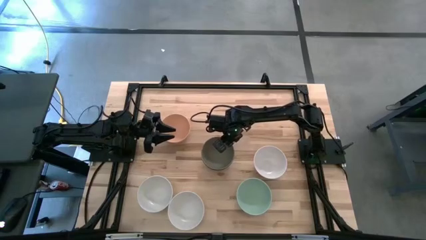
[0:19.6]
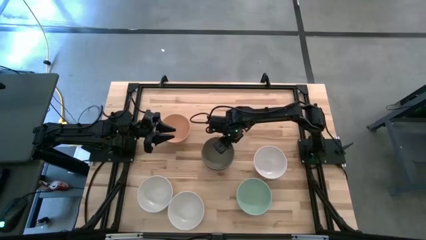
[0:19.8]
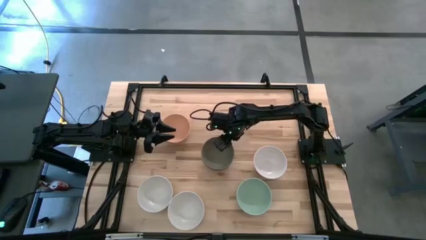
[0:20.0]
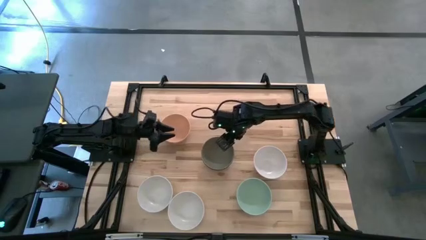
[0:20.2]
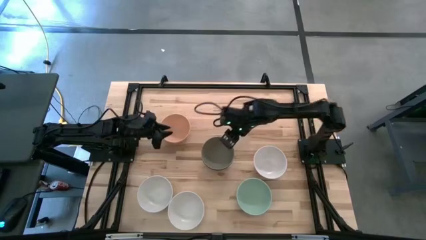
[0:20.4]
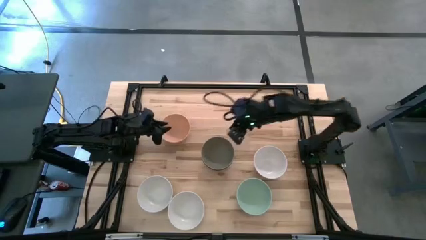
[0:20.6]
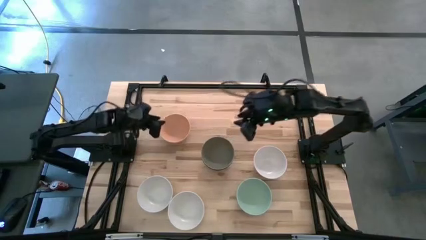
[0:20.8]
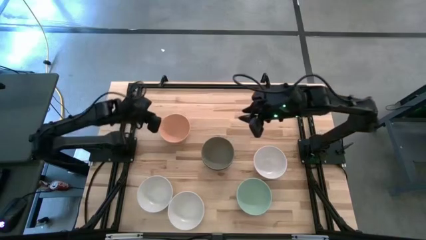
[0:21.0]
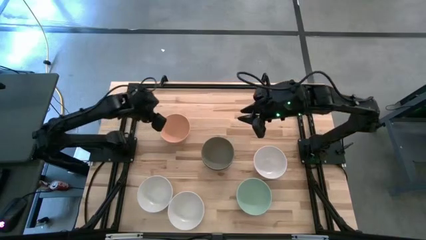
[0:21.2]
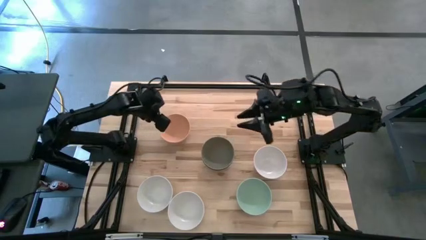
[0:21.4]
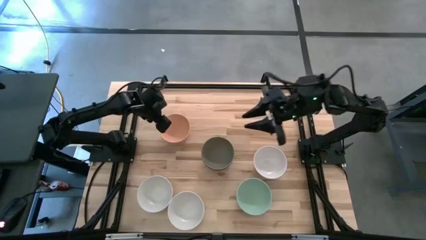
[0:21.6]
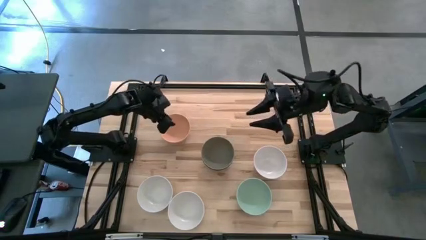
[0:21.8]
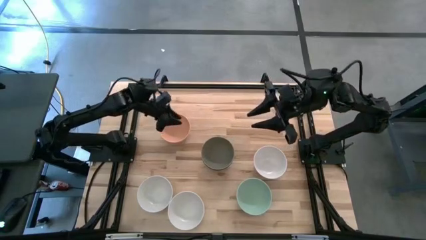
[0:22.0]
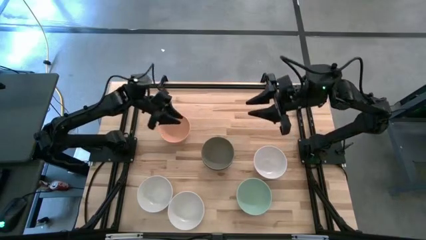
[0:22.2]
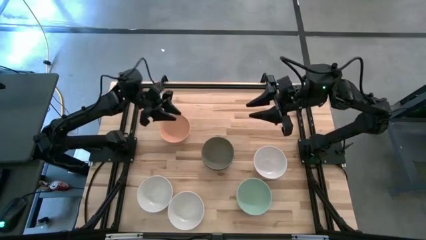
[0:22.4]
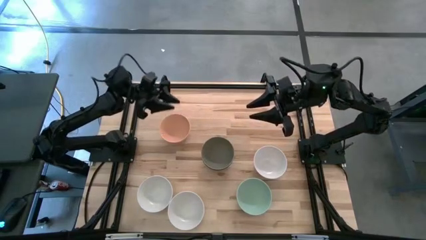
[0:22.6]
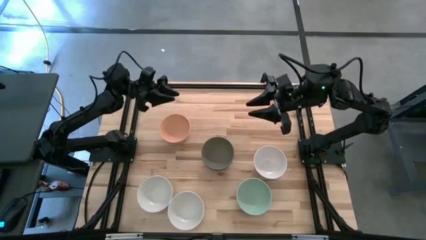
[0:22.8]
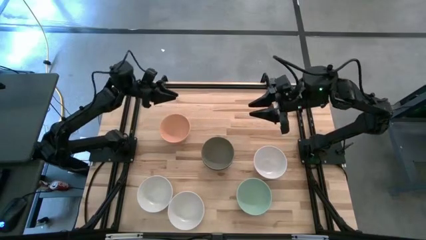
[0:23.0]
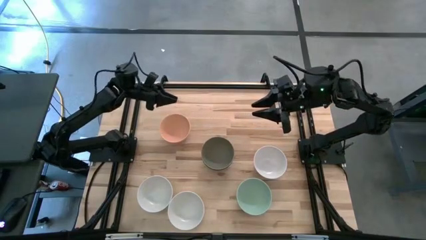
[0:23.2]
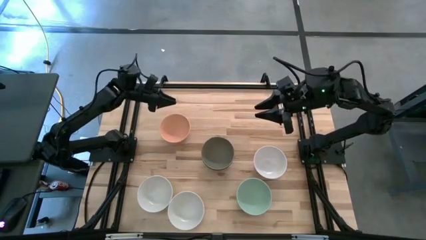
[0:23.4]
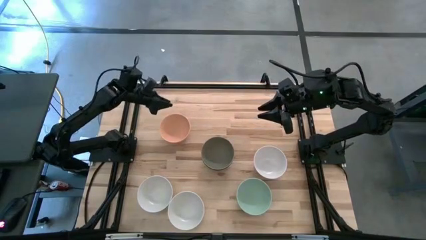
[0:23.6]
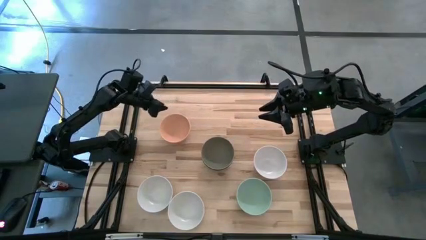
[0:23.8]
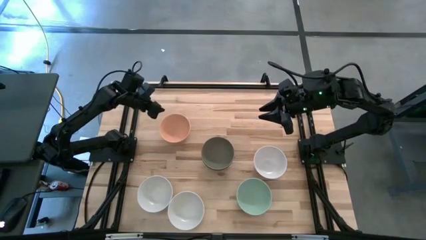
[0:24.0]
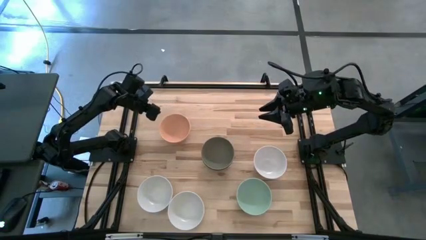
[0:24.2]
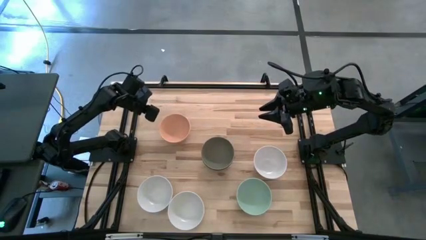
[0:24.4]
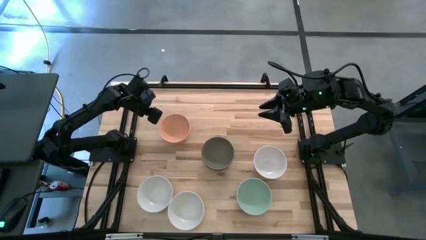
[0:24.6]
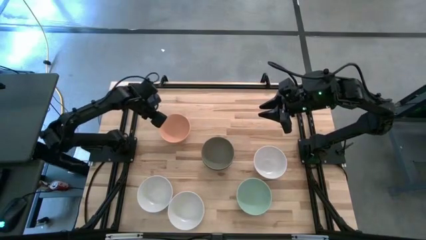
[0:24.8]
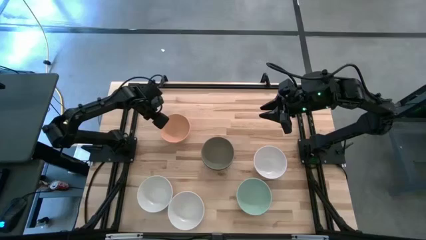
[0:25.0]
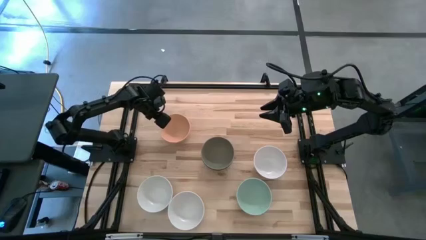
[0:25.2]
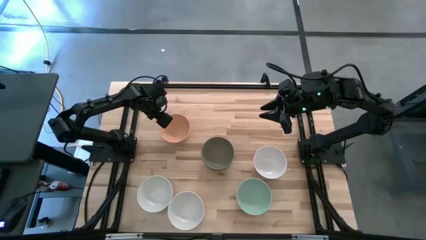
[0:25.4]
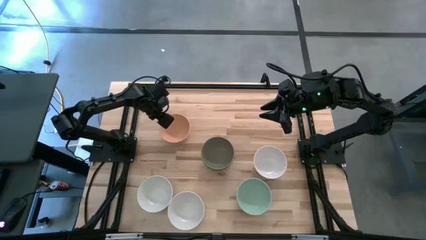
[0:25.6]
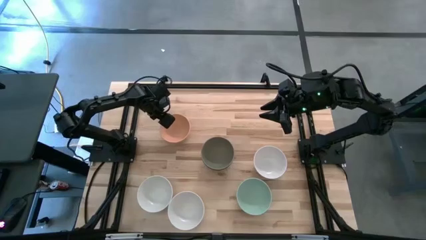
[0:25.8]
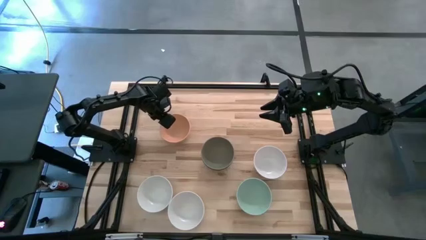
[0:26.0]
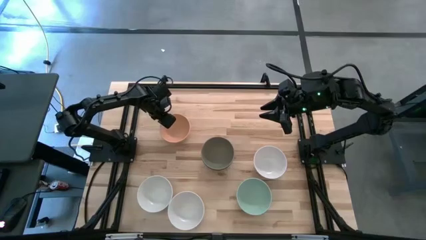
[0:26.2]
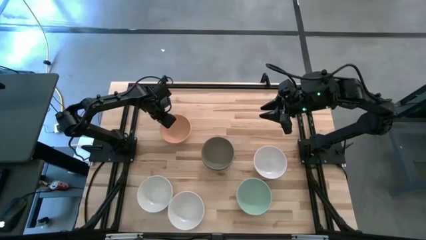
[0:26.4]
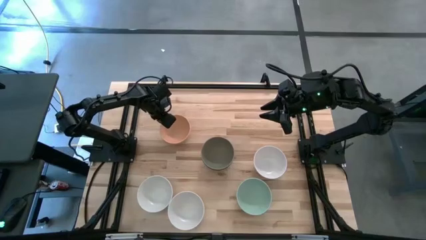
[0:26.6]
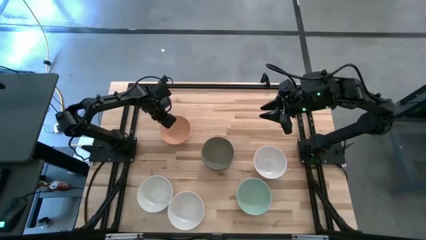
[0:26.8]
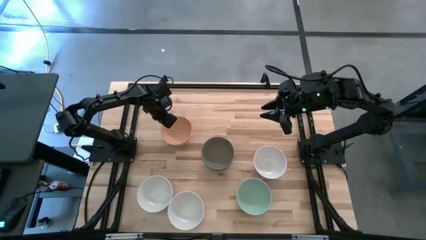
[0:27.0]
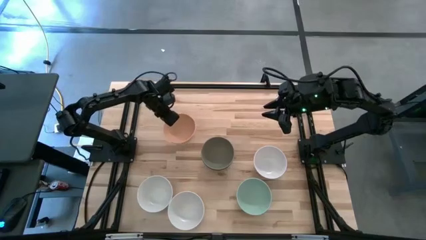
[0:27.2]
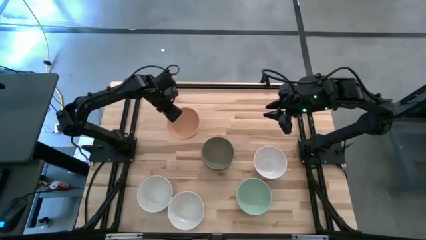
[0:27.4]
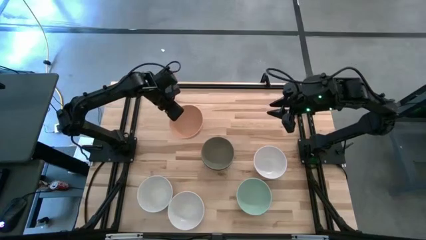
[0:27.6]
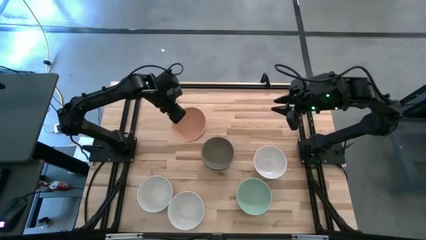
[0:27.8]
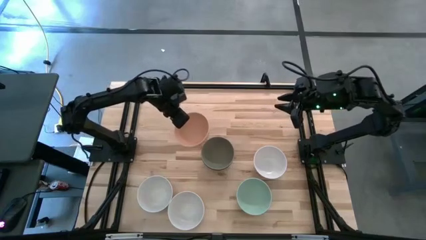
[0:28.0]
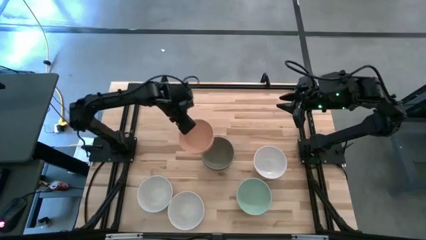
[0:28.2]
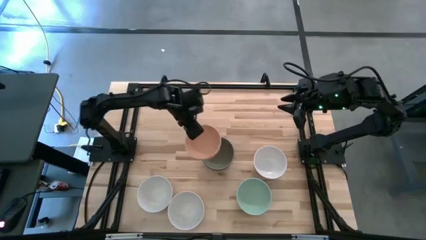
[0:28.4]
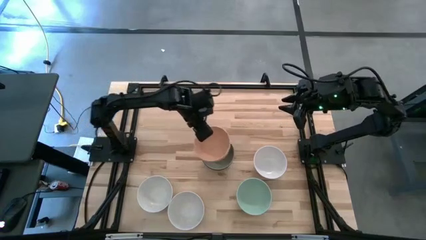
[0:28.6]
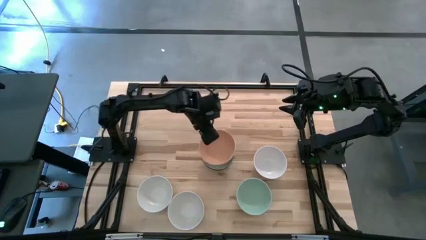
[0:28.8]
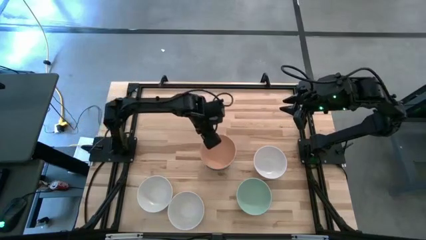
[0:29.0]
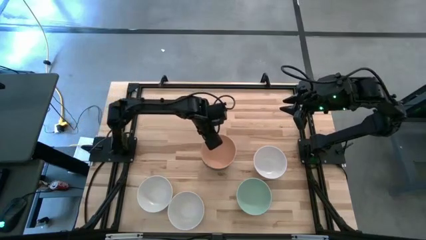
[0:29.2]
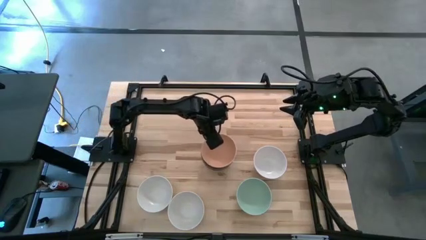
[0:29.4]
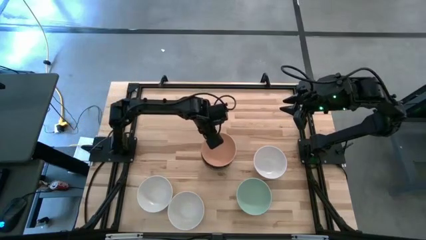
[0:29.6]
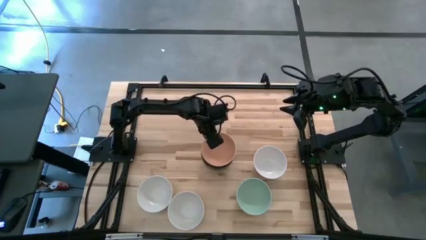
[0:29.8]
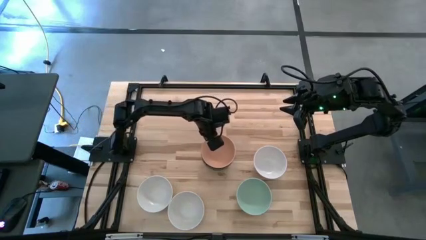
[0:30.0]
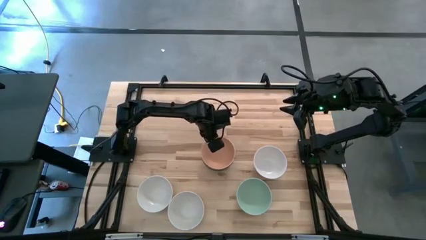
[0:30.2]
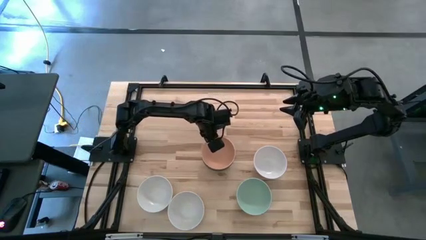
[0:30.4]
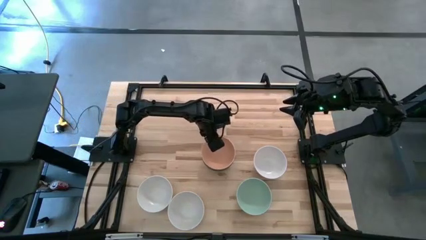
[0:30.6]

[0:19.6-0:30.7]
Task: Nest bowls inside each other
Stack the orange bowl on the gray bowl
